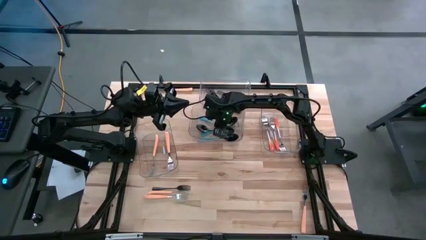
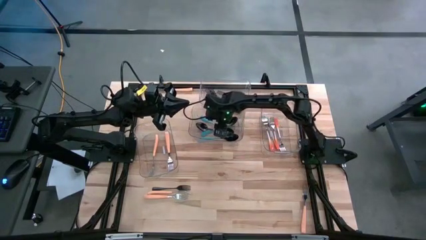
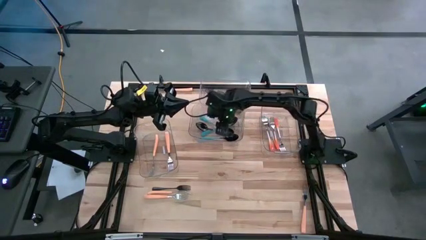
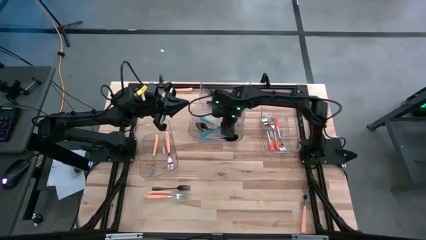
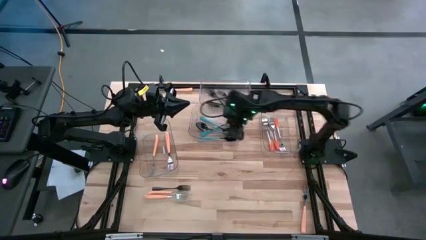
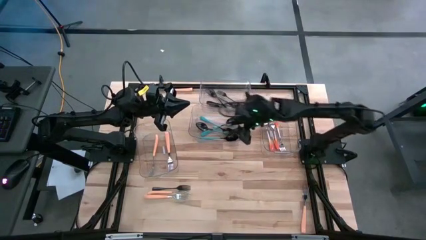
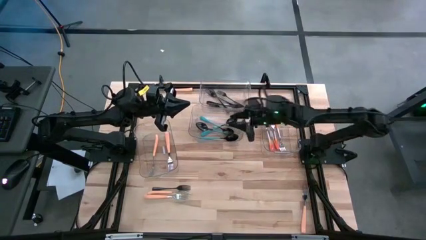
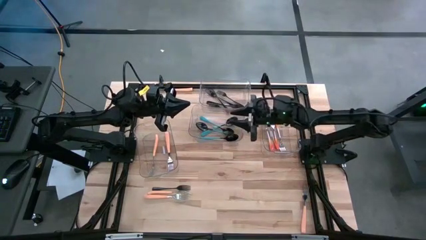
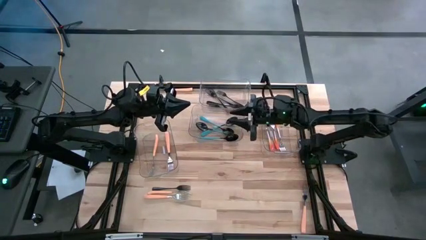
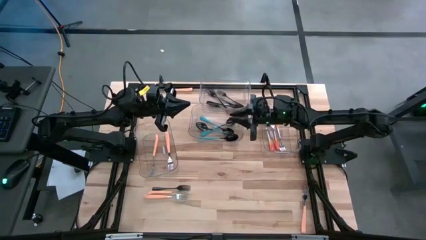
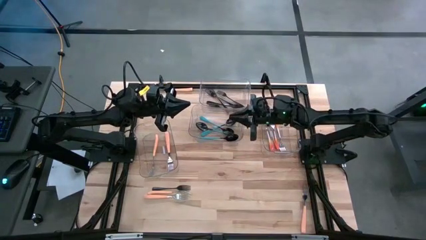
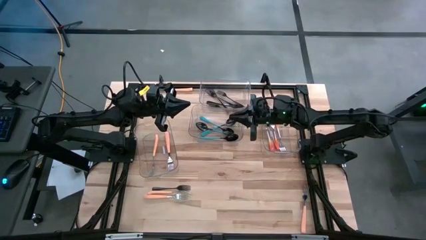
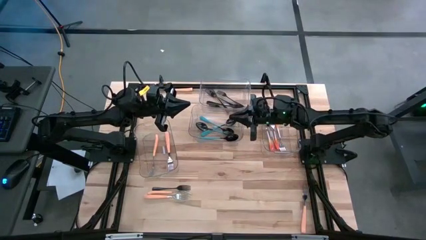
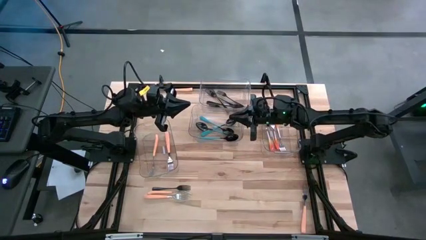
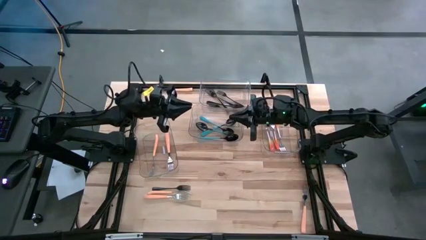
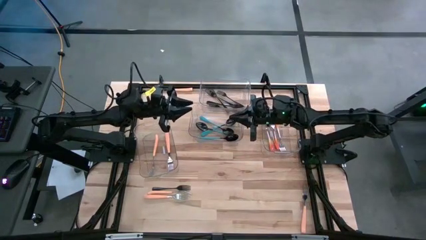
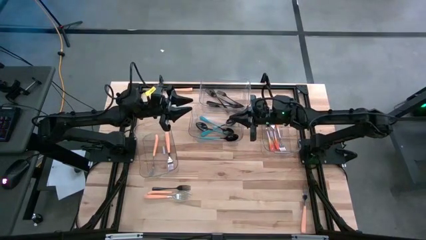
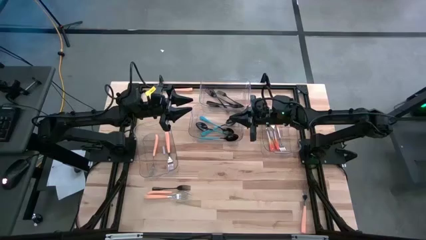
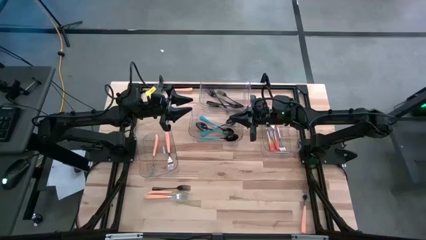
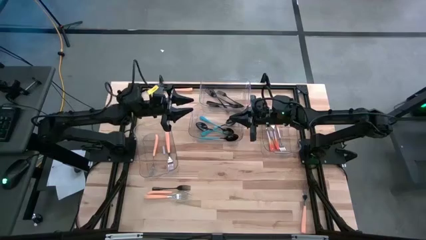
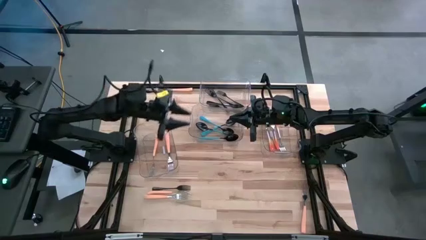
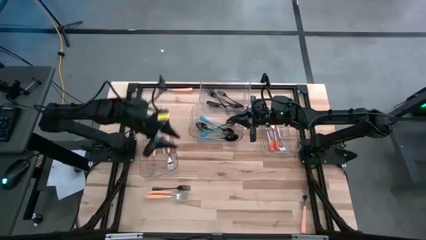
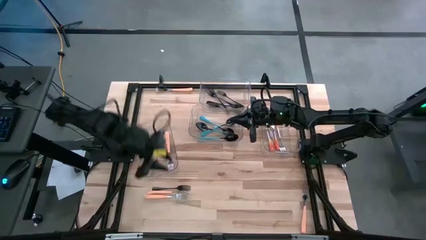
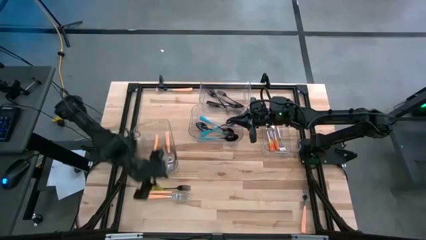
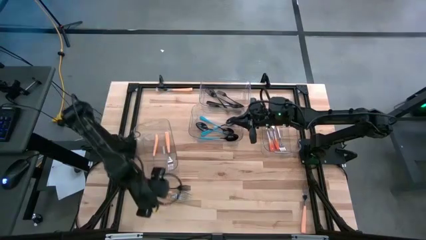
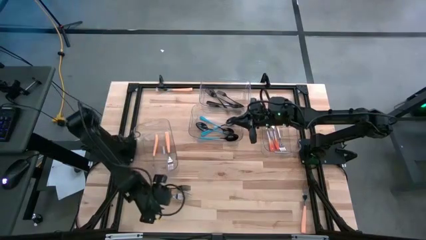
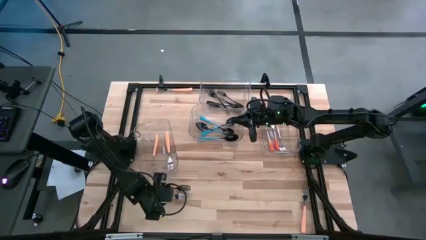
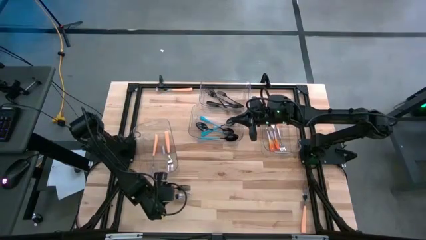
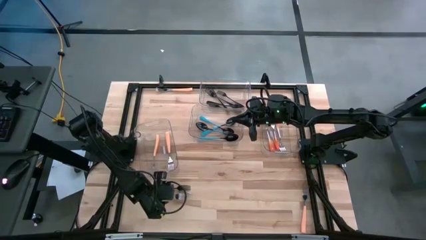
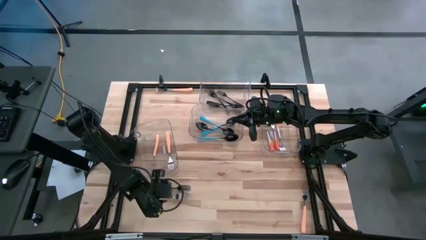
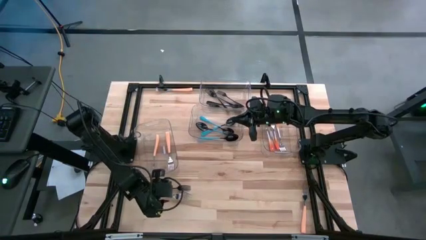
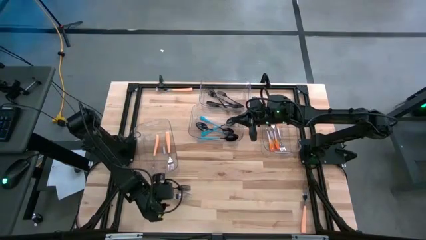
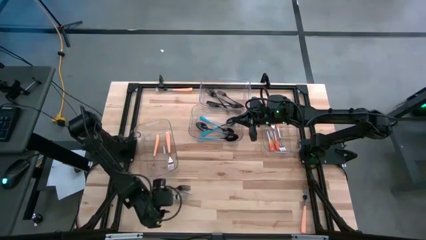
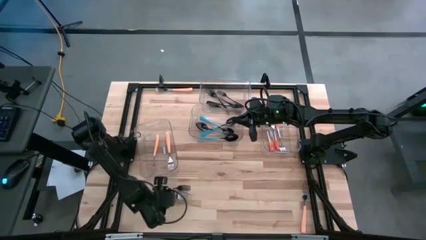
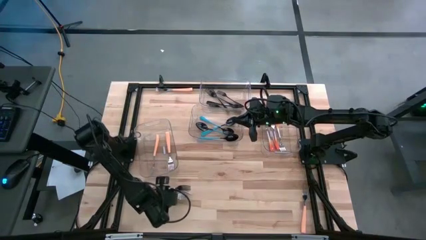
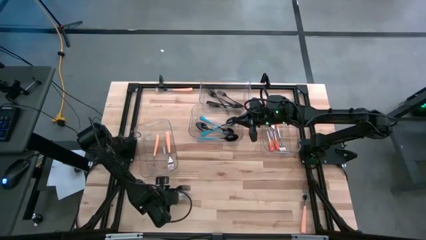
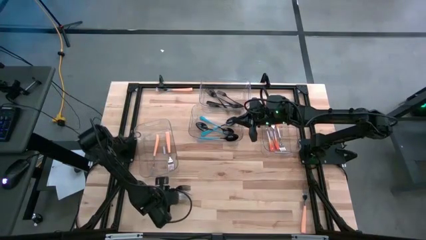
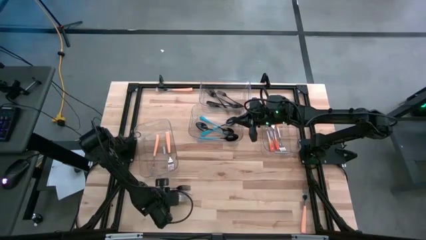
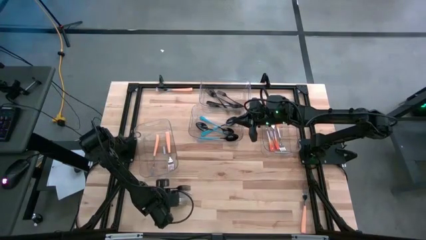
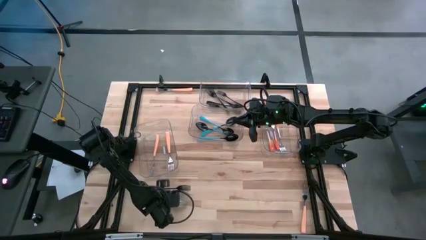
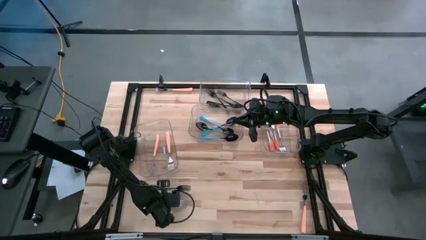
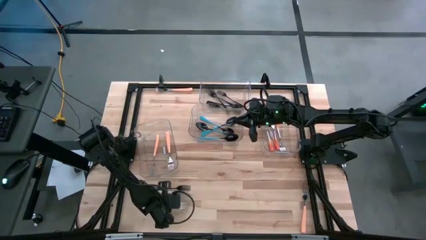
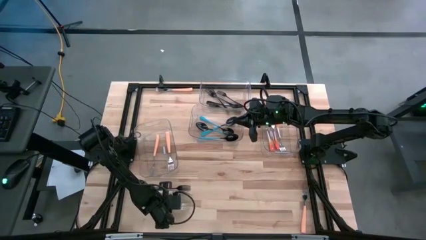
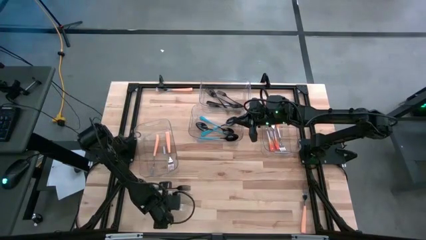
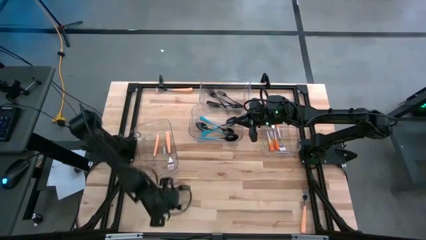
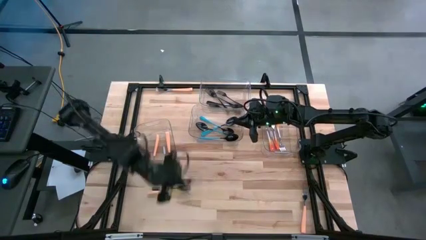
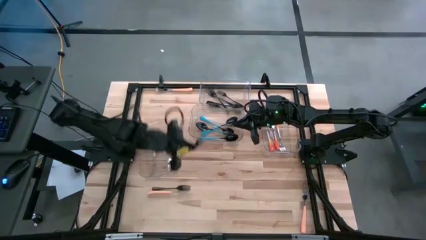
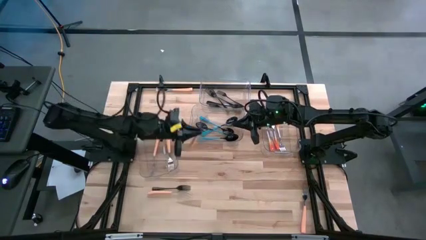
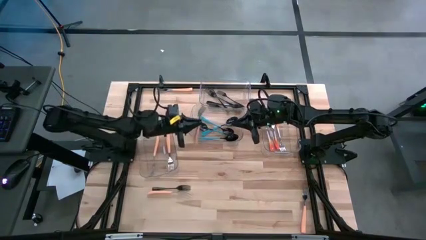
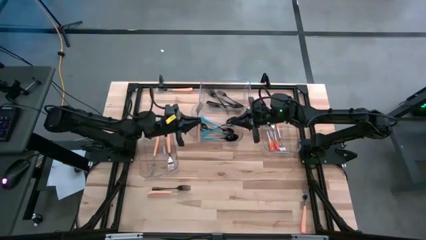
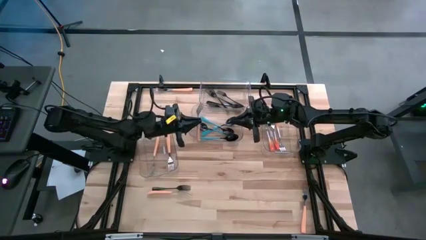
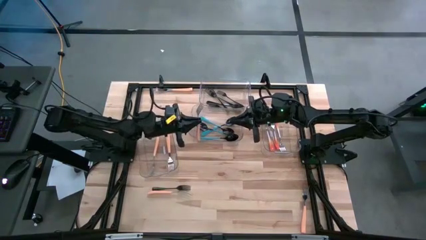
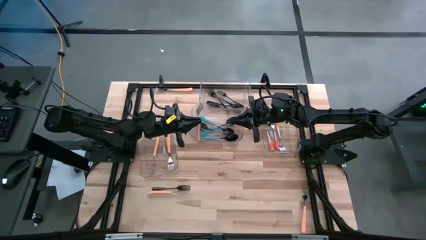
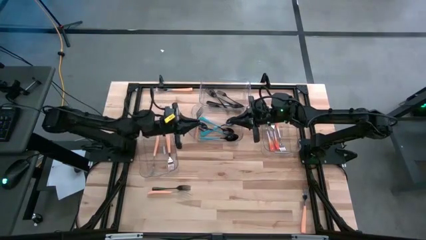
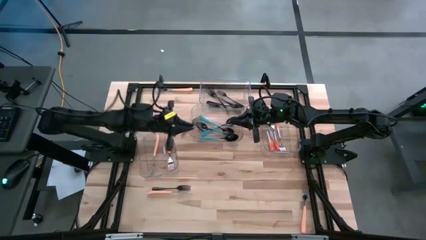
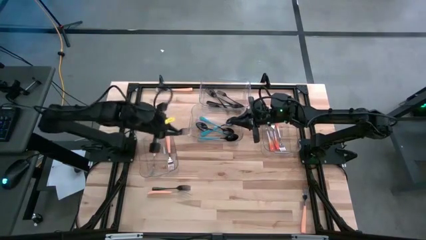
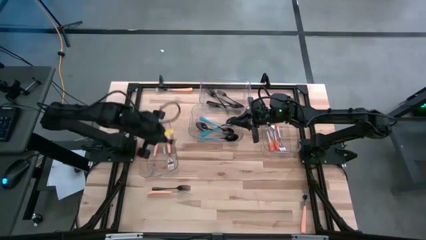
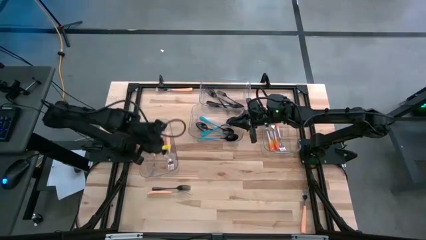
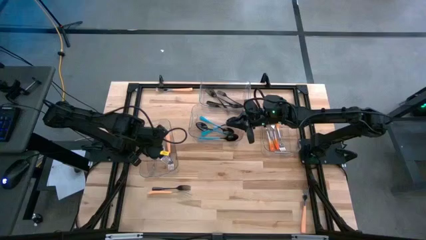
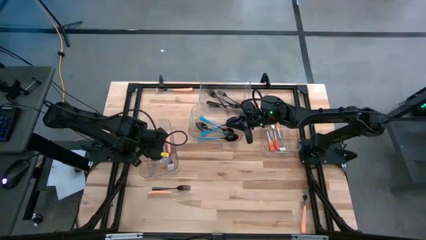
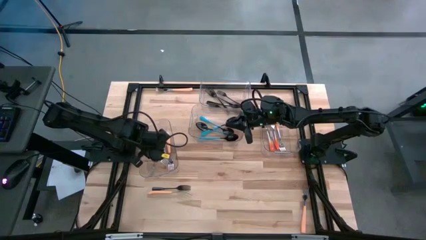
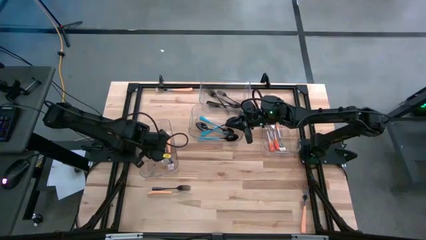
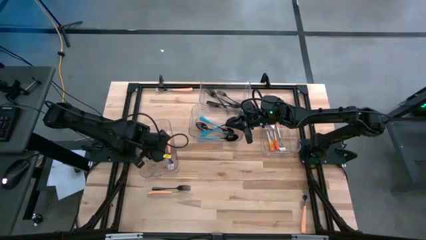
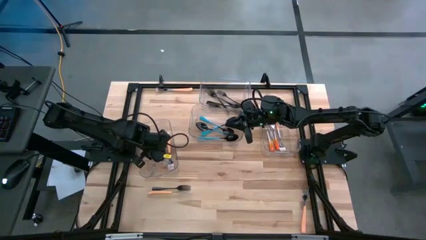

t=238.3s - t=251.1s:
Task: Sort silverware by color (type)
Put the light orange fork into the bottom left transparent bin
